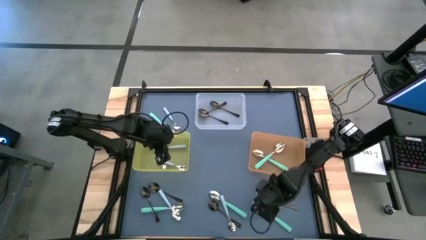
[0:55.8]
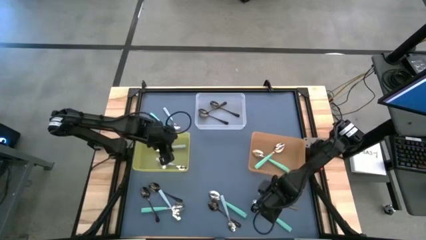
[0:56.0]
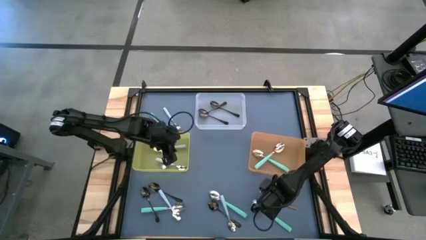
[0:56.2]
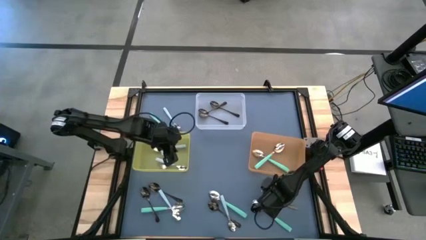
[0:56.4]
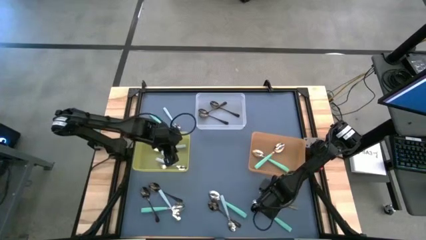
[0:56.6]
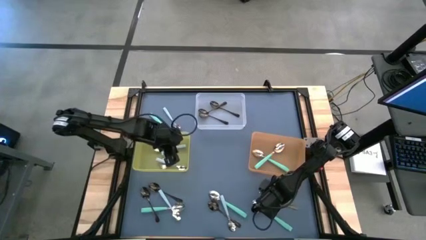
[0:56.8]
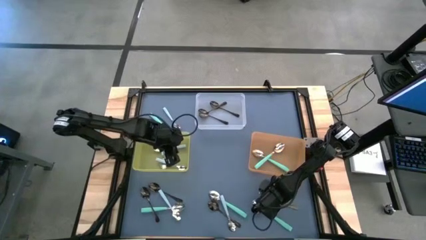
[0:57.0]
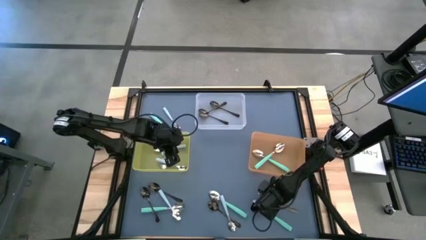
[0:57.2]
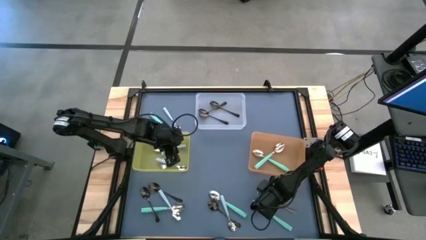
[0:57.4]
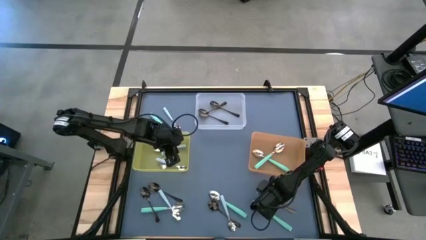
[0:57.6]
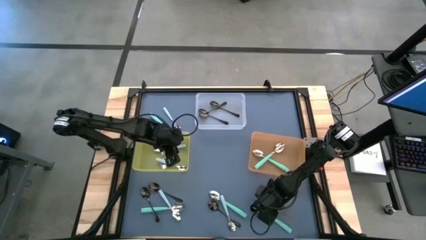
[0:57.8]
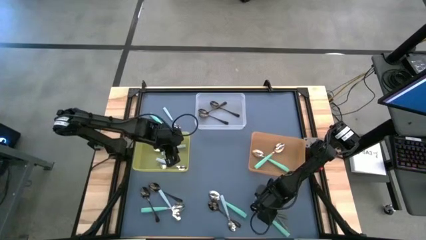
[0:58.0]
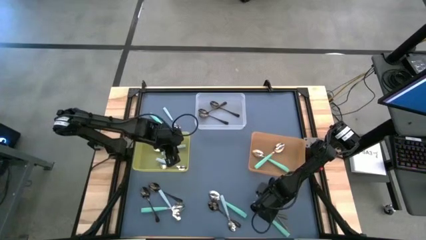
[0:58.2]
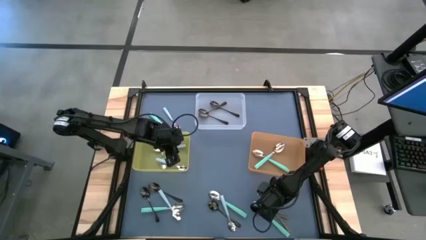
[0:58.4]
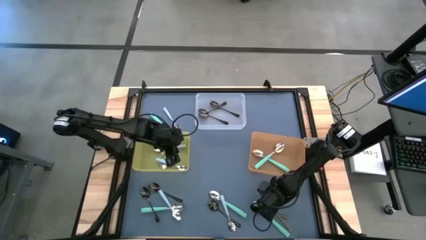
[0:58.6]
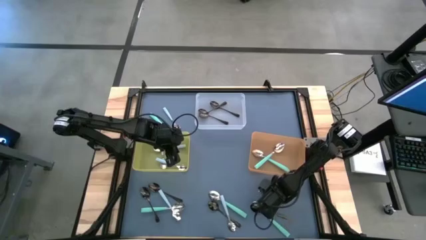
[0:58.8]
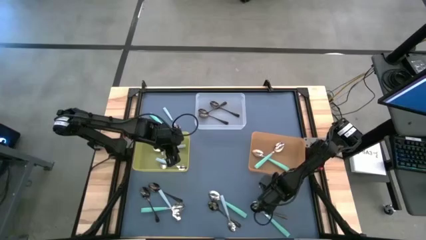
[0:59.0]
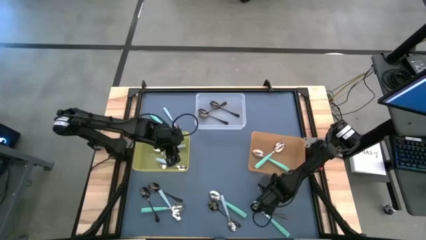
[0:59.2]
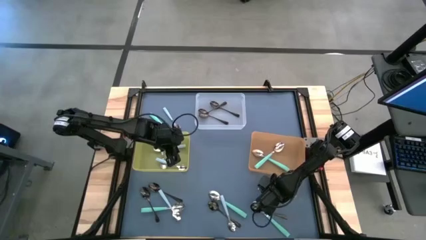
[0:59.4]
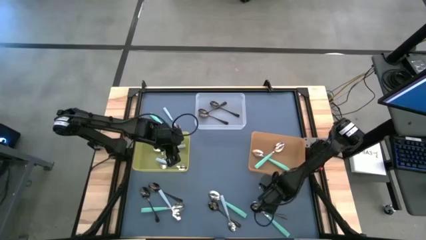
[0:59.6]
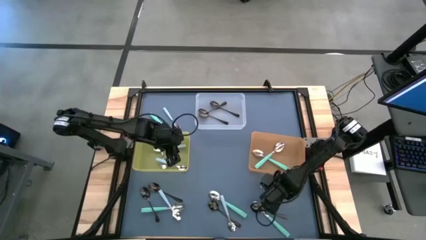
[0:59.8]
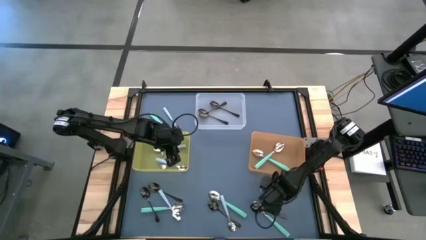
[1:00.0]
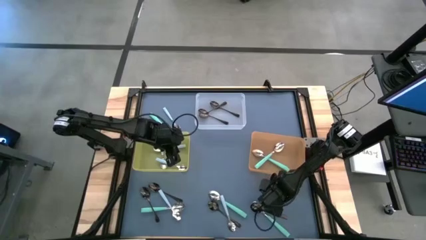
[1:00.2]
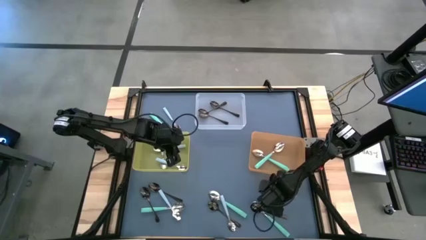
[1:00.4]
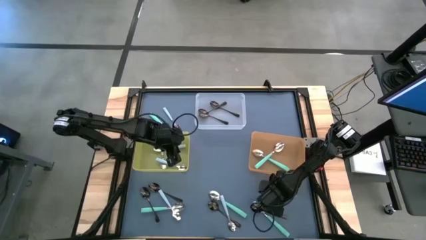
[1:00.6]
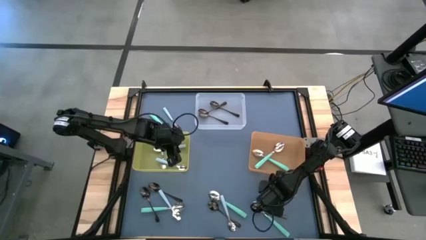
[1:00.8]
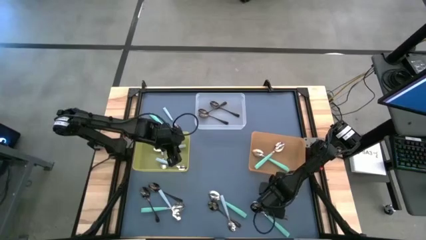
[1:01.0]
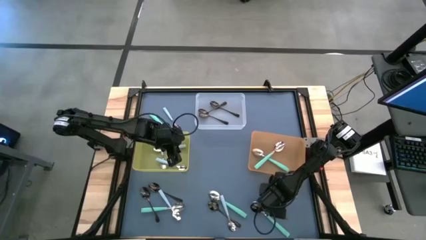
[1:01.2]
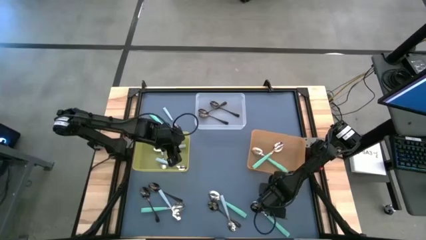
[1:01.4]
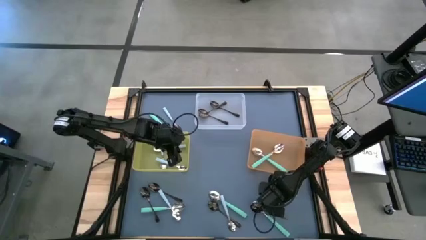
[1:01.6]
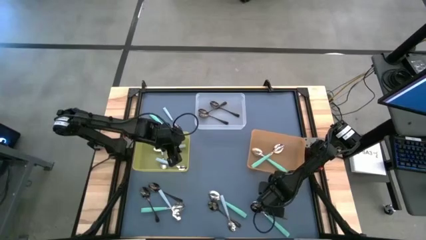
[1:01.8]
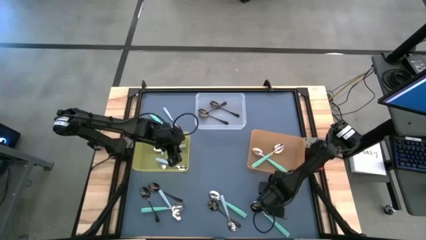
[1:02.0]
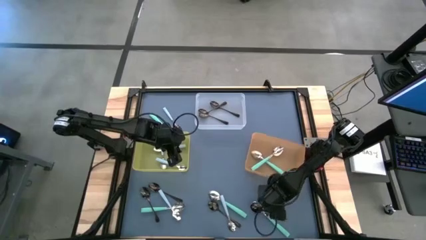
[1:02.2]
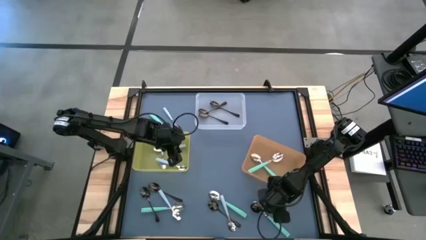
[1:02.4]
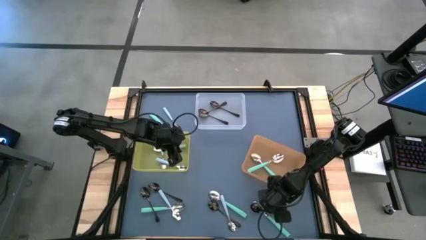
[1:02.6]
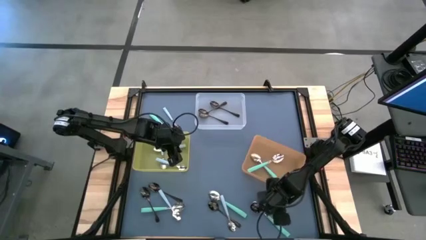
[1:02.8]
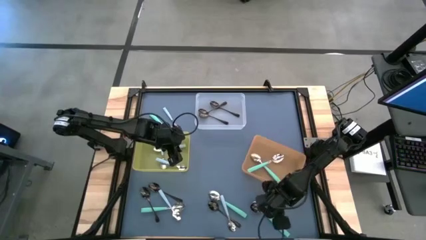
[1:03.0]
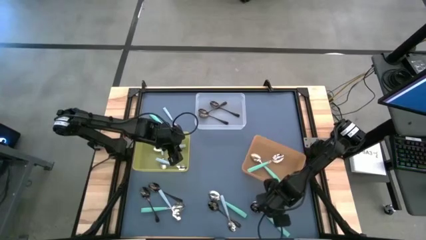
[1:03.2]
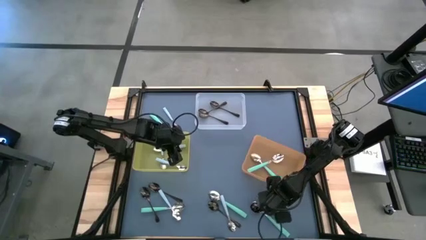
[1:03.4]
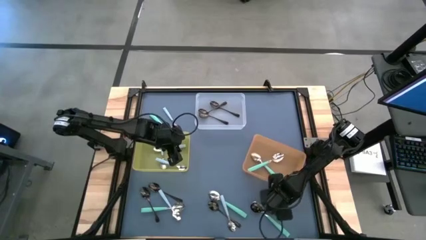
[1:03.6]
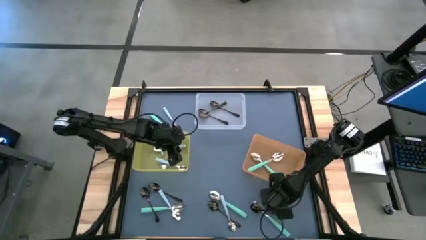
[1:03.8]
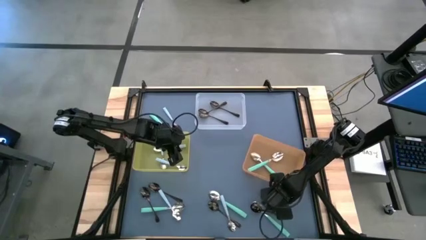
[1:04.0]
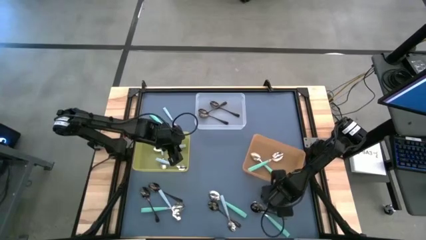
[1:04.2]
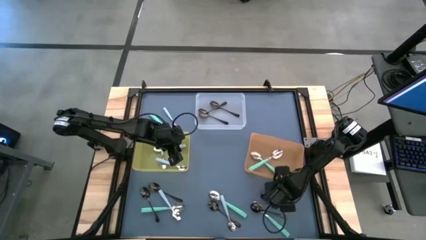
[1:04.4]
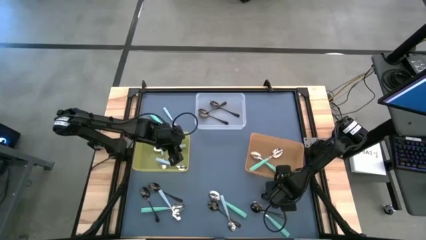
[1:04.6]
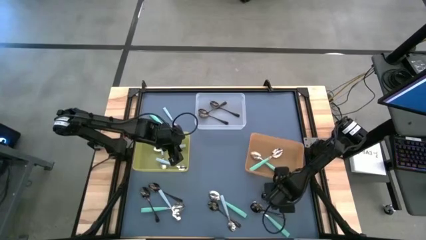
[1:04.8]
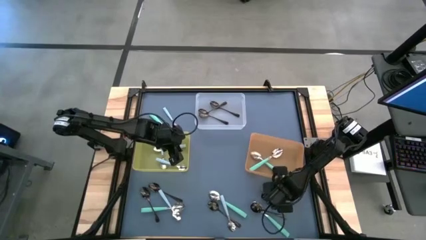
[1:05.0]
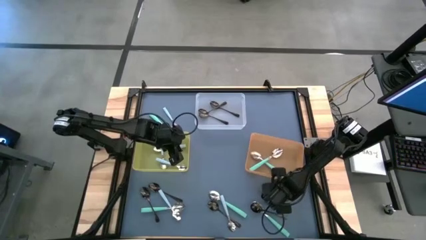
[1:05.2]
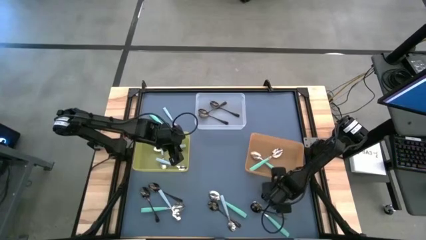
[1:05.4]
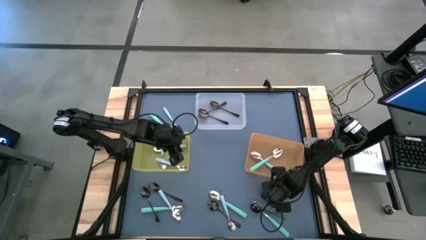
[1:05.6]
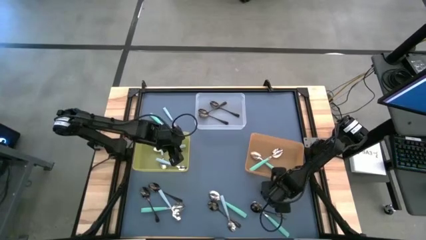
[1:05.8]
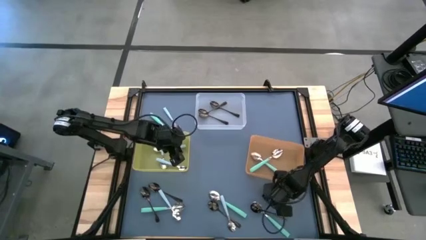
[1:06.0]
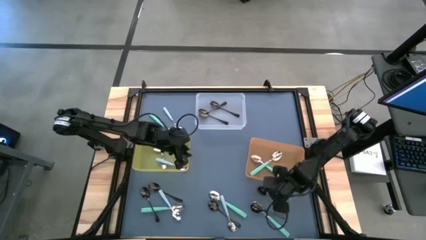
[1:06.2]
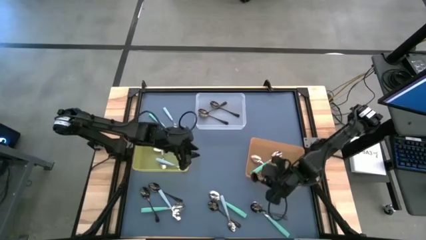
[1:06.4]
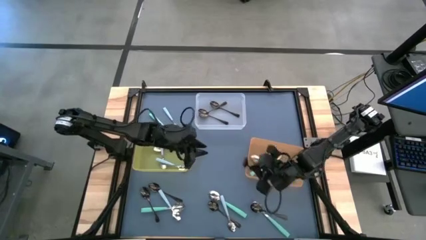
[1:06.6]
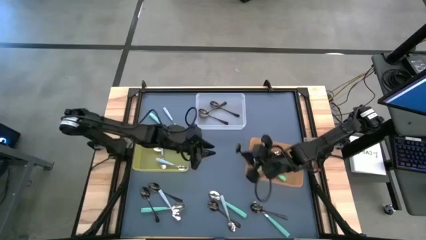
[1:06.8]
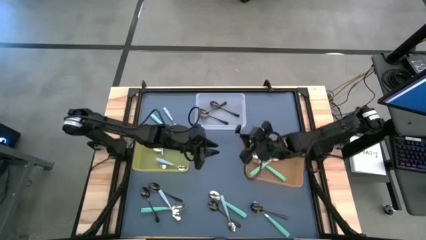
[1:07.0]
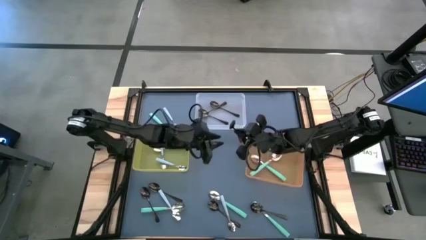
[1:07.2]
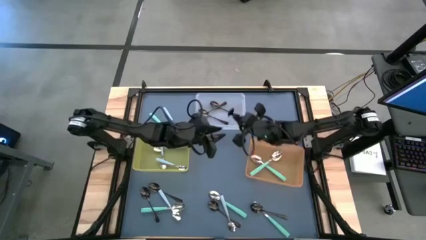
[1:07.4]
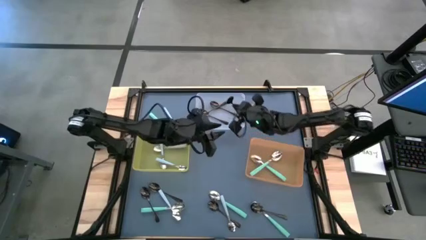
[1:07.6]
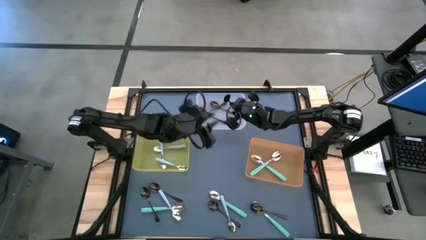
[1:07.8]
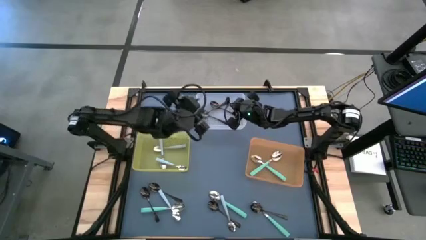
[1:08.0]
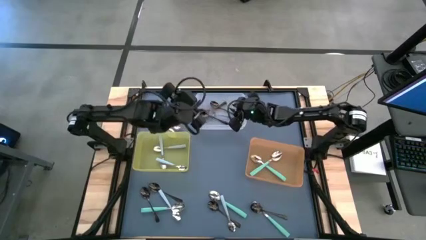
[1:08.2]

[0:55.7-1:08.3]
Task: Sort silverware by color (type)
Put the black spoon into the transparent bin
